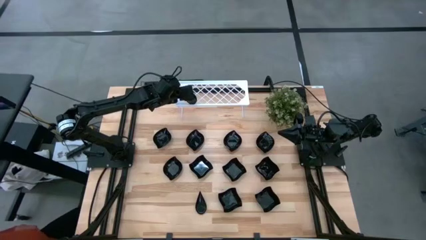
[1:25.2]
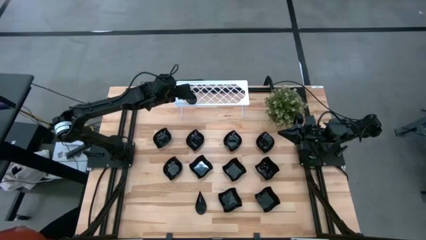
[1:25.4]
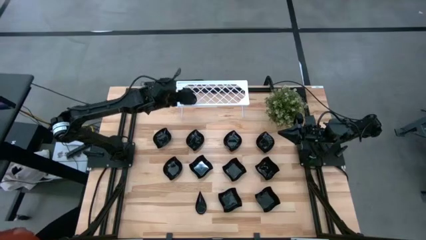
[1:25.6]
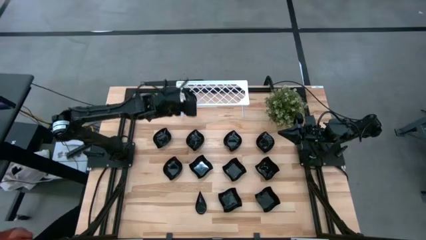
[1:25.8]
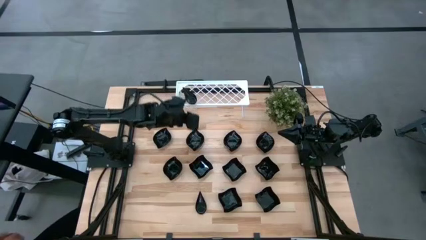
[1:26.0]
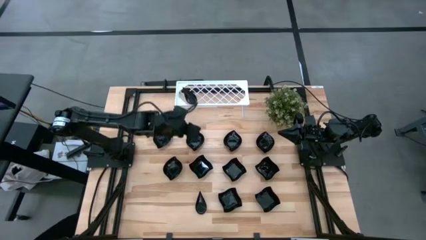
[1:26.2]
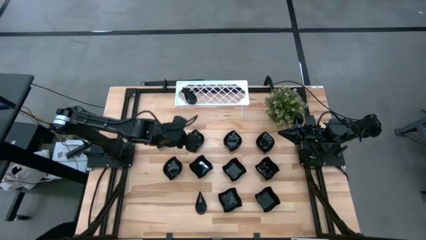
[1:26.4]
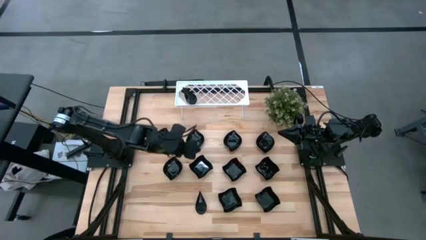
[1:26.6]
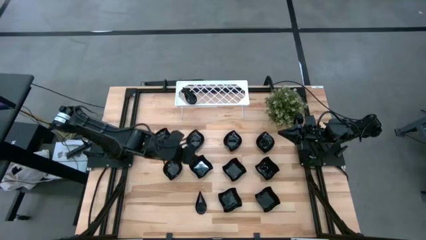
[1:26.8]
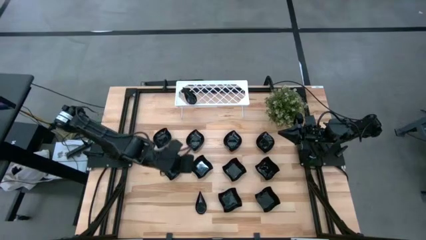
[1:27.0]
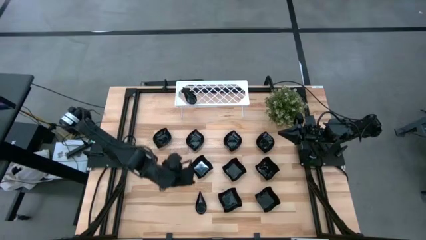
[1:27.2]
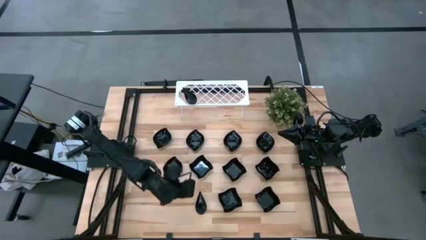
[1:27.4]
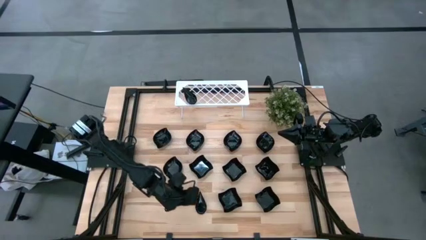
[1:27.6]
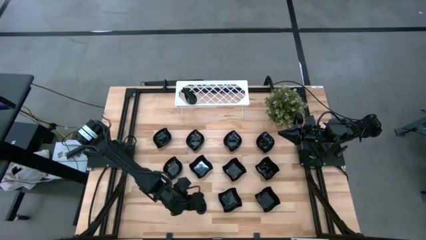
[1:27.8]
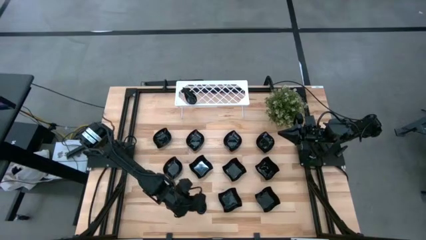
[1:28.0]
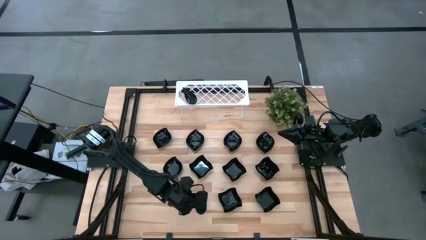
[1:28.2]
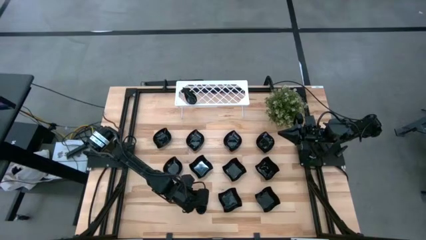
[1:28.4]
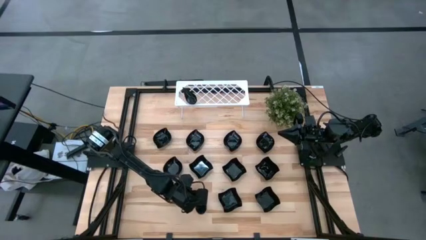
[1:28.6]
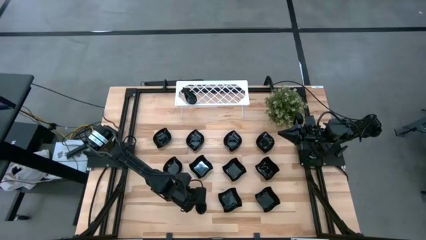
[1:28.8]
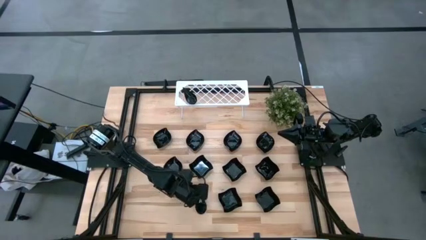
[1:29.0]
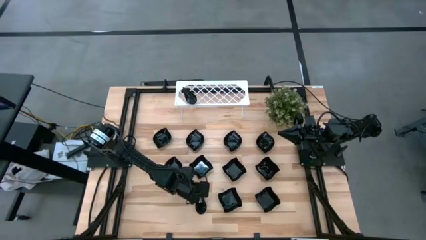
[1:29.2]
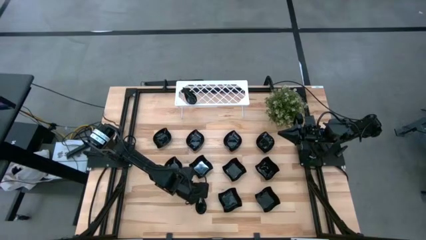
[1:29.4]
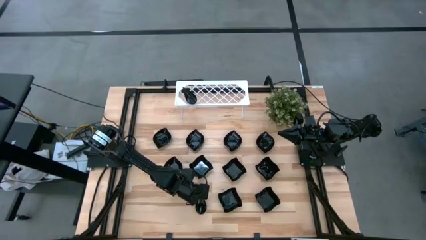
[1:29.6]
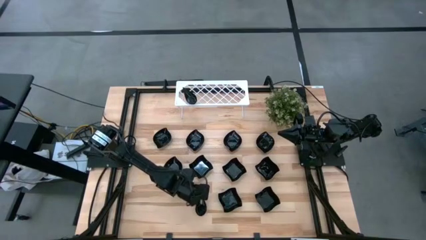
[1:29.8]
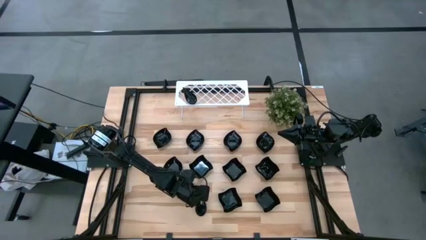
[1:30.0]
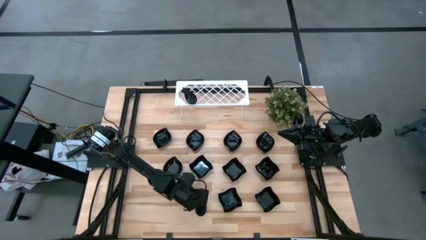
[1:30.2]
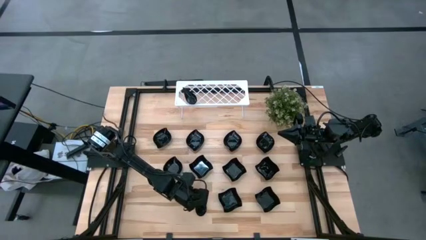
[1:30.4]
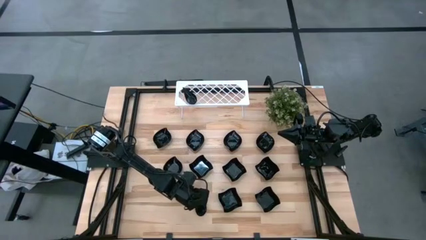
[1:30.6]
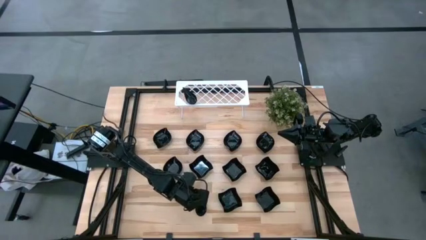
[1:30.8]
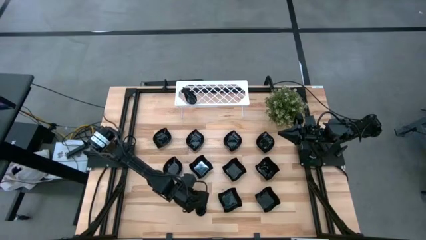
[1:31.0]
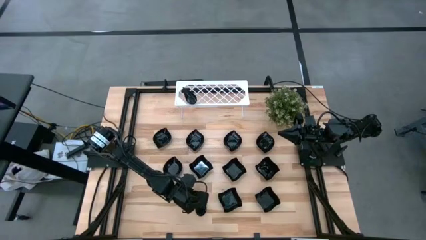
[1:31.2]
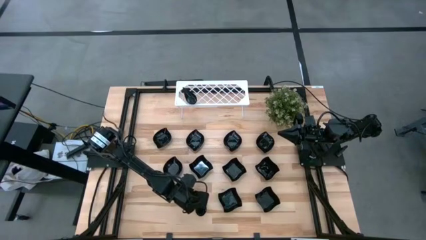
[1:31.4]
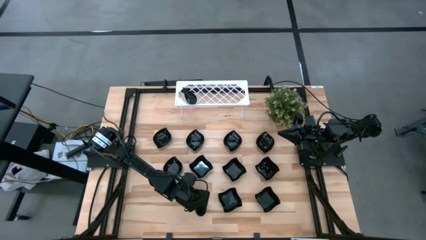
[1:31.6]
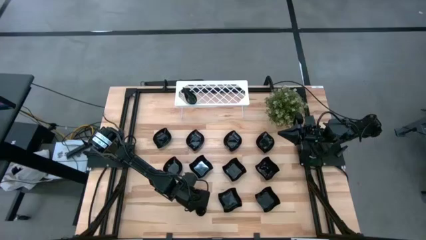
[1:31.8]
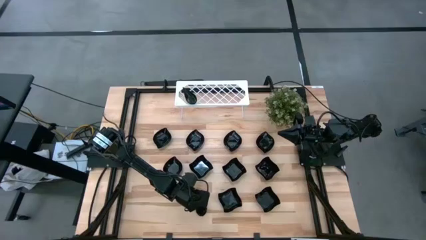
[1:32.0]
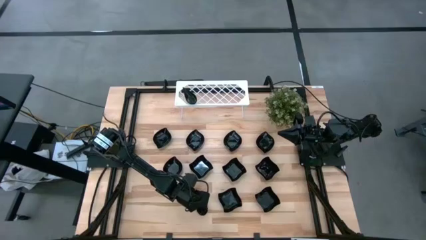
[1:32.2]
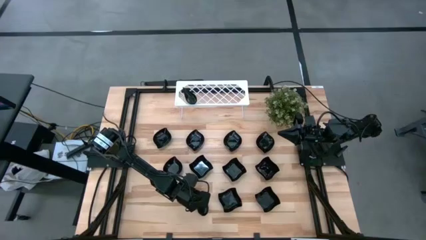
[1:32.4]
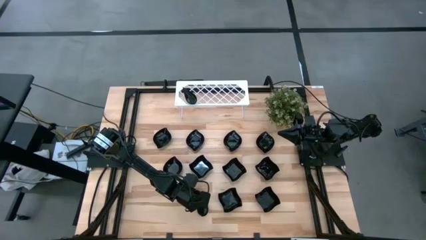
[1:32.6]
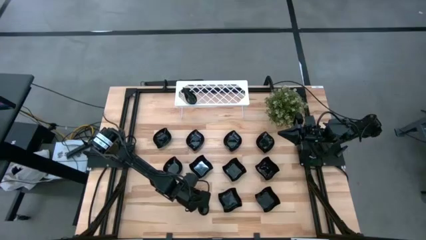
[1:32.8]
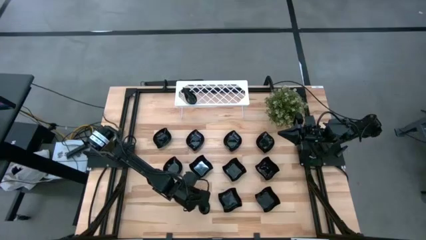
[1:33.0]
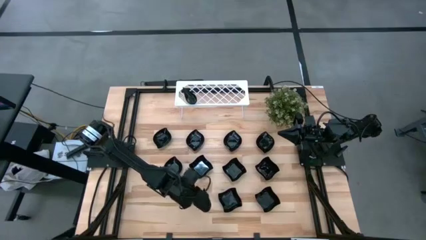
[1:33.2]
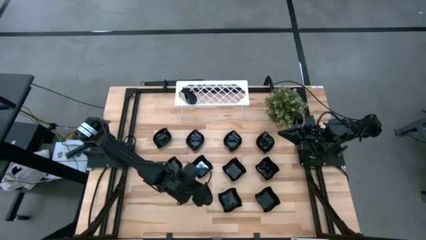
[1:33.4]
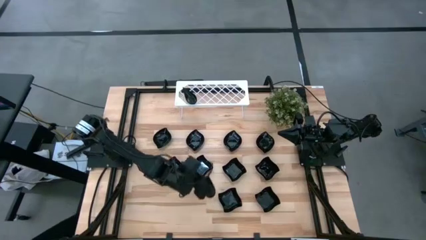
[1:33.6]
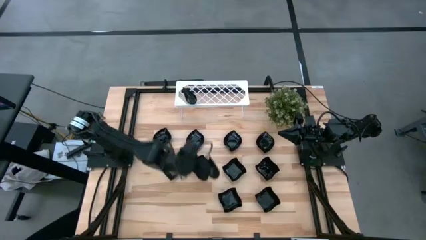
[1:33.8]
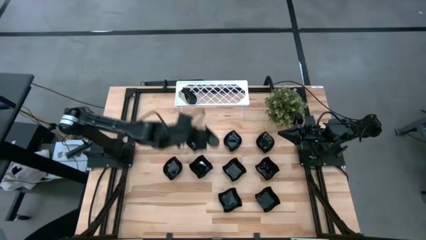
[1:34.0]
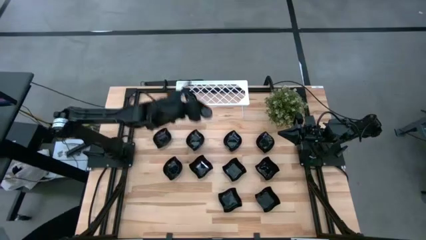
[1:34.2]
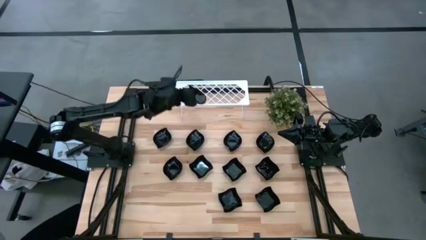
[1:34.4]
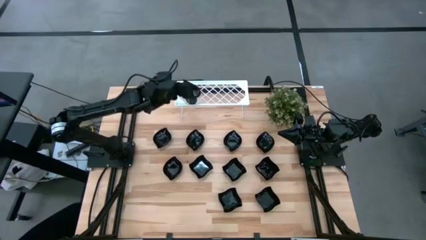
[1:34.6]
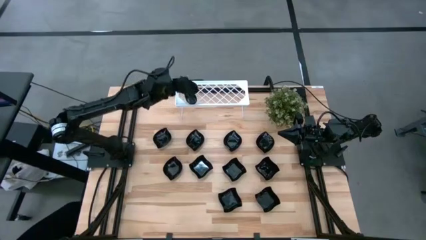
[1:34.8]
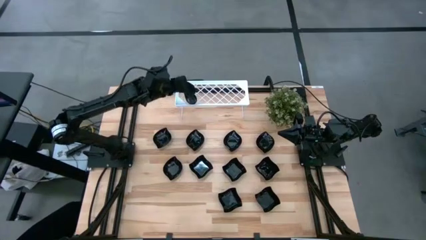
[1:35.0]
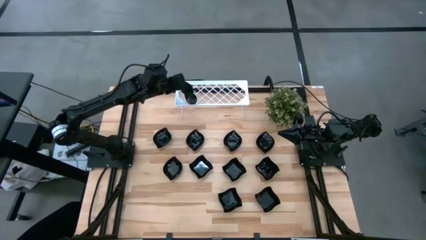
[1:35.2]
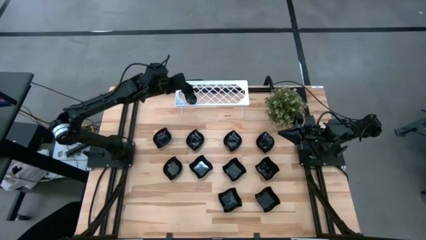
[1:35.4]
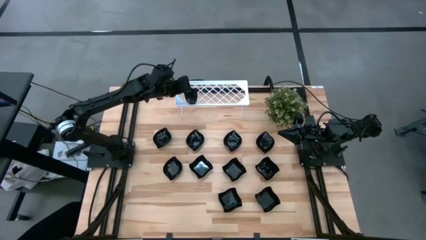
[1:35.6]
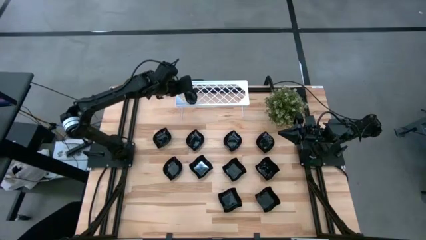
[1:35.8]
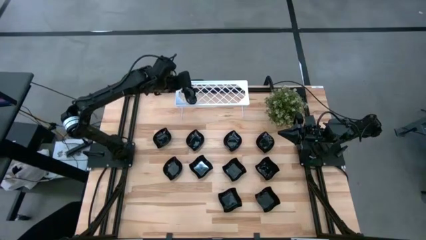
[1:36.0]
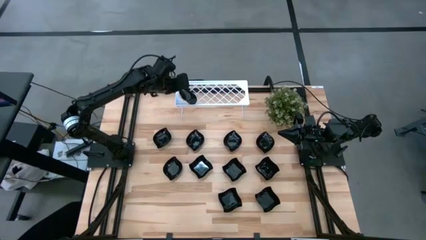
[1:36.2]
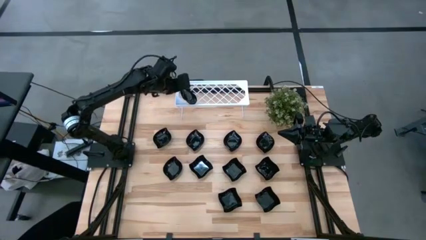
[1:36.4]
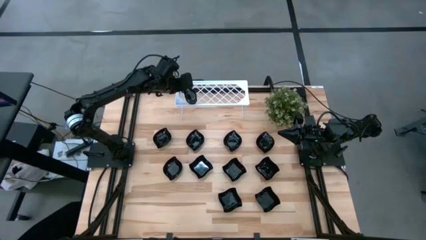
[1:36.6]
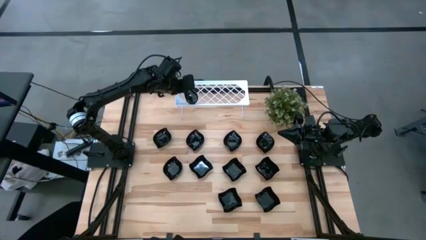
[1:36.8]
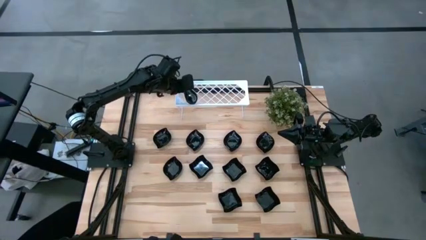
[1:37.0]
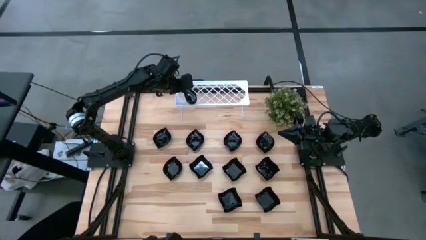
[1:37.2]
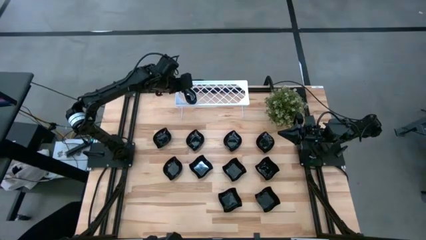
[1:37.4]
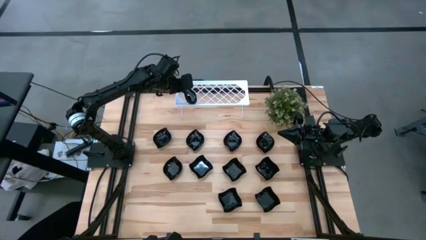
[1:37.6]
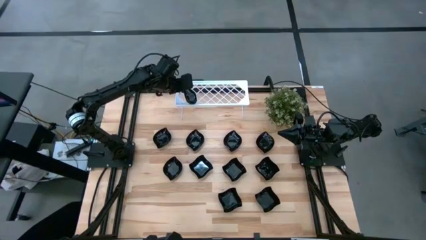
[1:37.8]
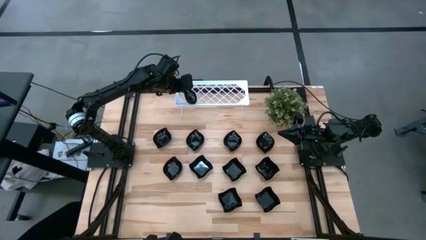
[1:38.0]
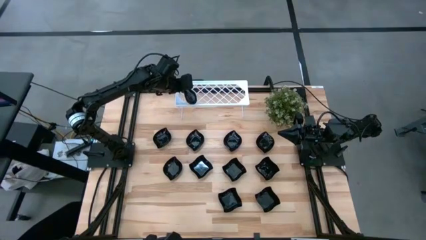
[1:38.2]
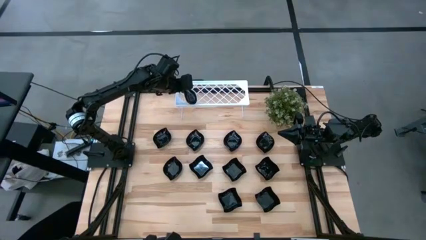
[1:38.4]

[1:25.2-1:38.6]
Task: Pick & Place Mini shaped plates
Stack the black drop shaped plate on top of the black drop shaped plates on the shelf

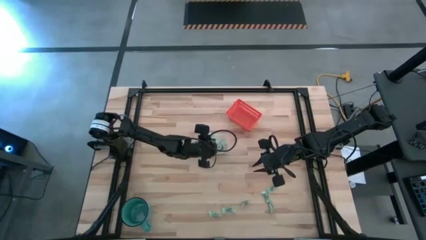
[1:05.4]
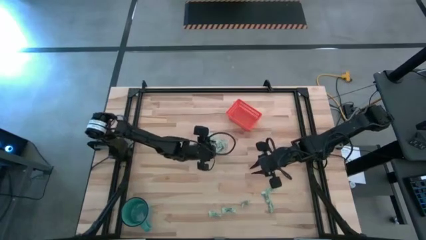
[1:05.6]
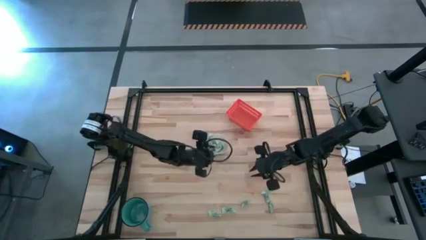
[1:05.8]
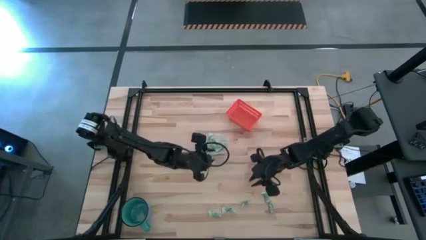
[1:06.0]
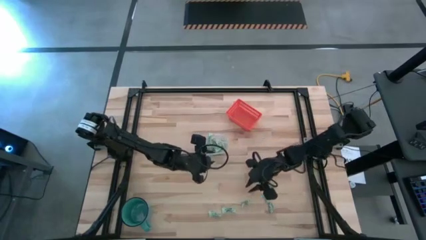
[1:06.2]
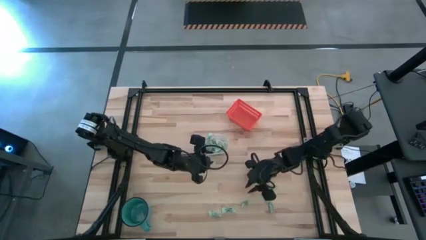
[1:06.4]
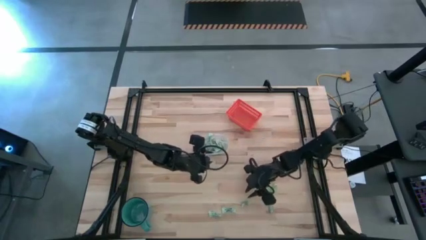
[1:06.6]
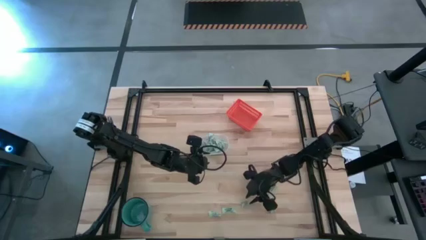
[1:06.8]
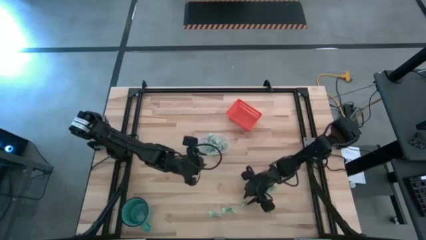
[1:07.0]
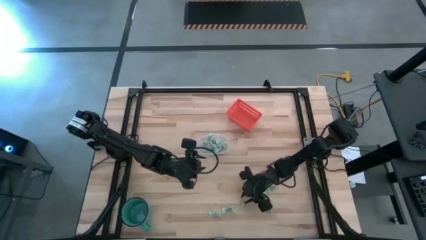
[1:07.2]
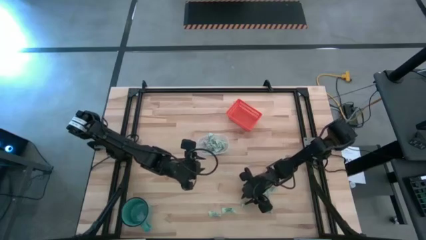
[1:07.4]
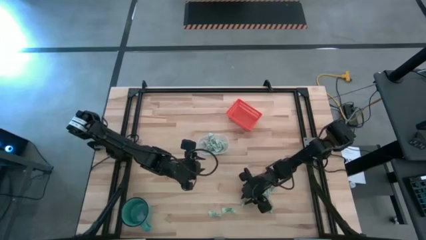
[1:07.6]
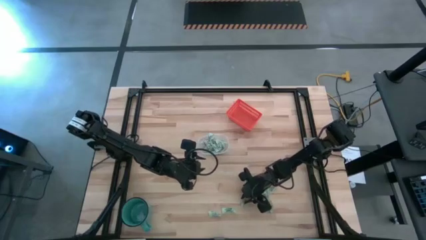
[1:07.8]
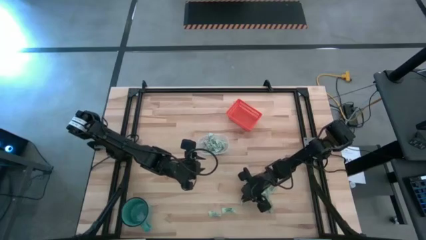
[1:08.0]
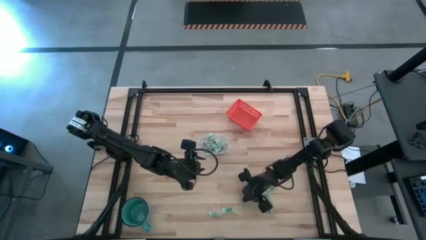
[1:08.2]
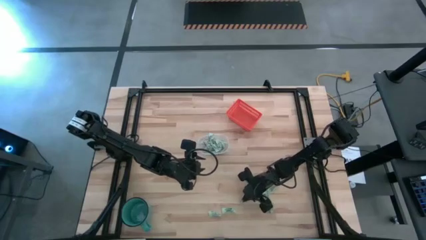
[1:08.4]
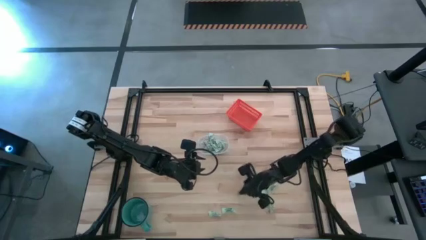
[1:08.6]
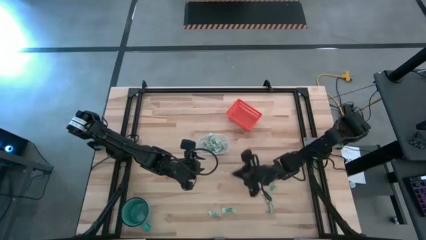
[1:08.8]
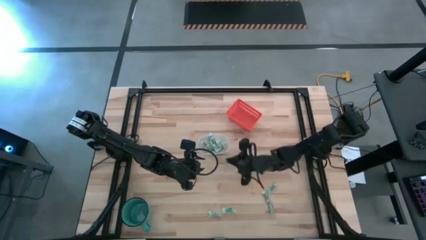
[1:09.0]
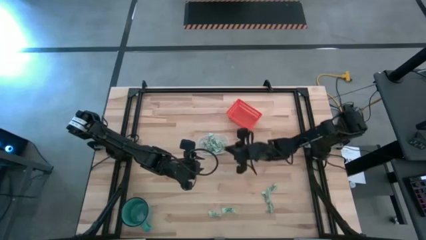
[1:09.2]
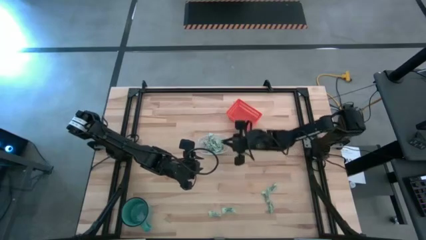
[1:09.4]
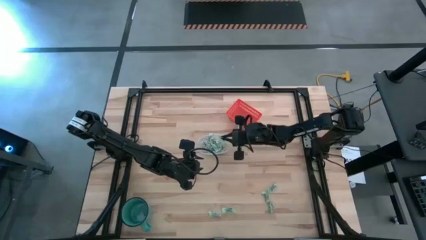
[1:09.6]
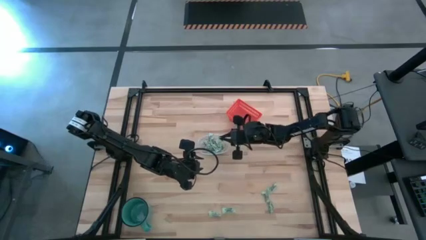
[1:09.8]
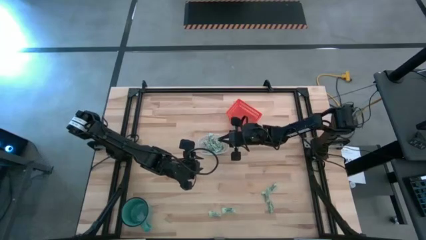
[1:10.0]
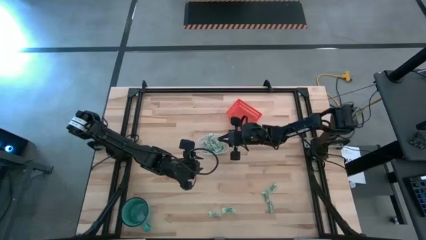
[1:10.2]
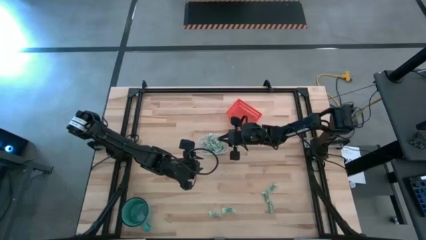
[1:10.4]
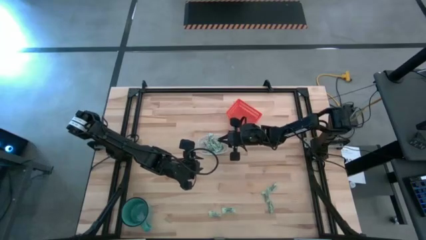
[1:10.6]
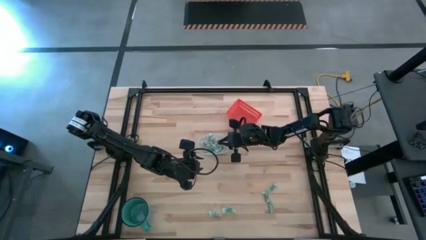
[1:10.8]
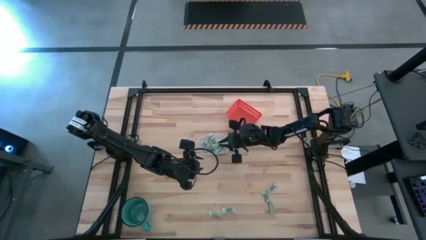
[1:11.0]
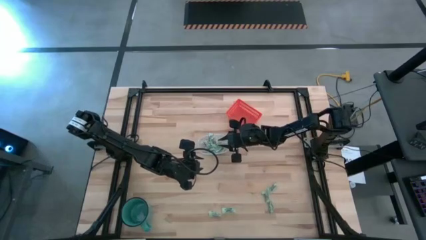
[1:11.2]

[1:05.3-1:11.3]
Task: Pick and place items into bin
Put the stevia packet into the transparent bin
